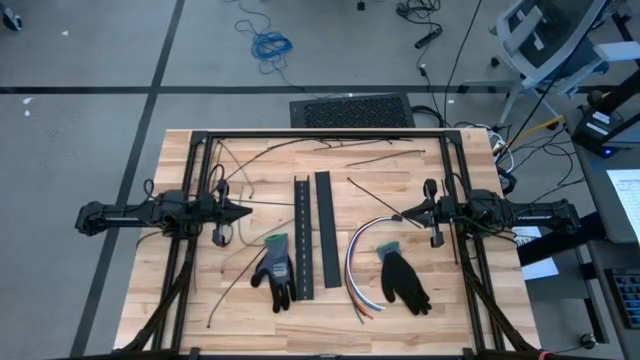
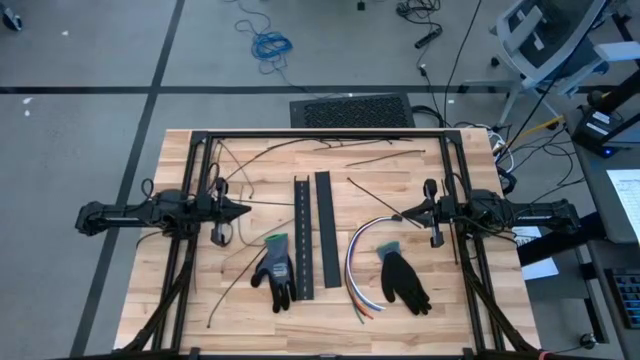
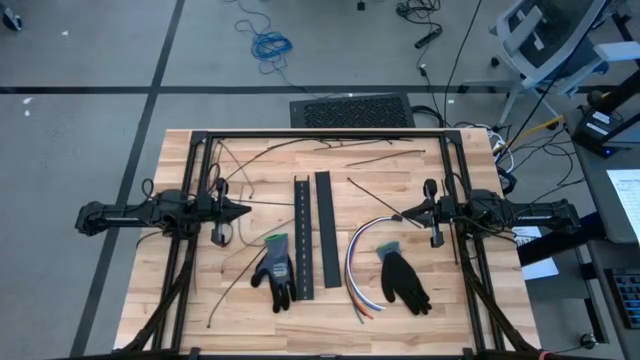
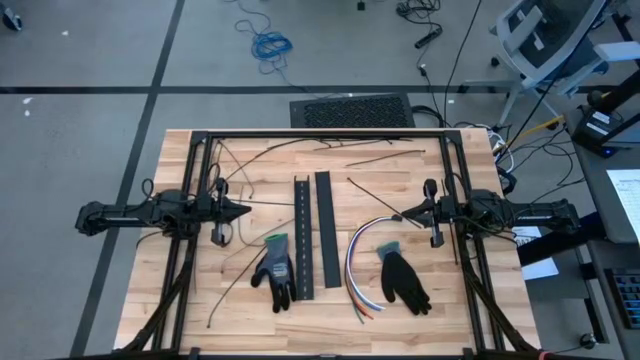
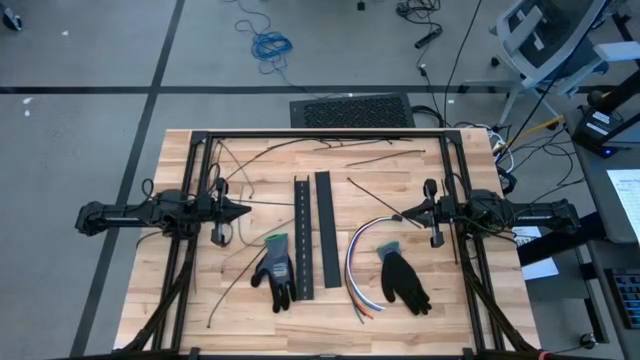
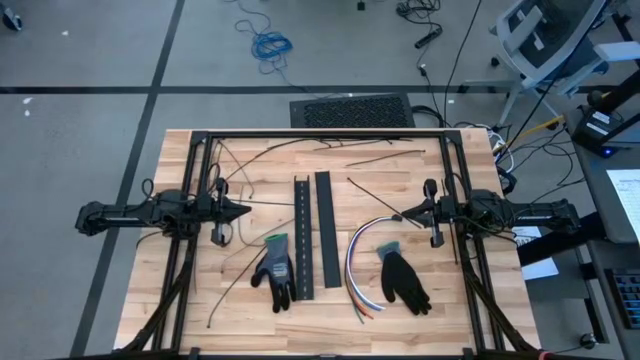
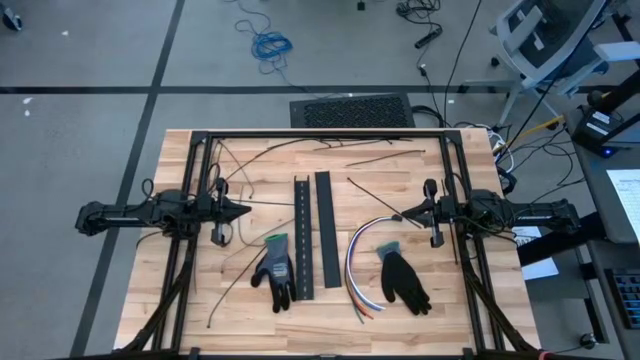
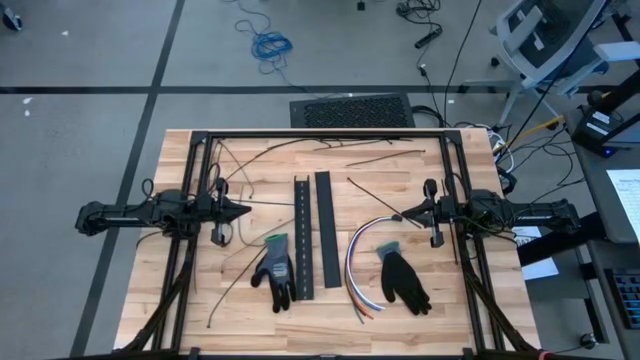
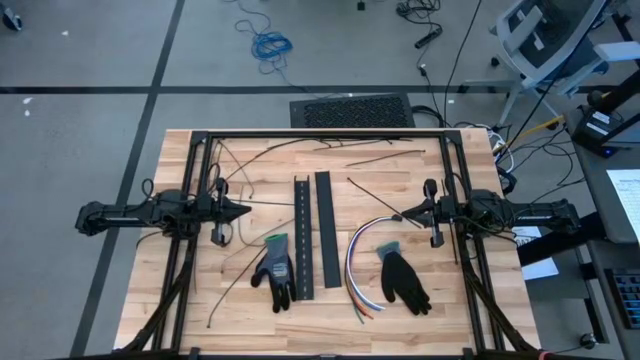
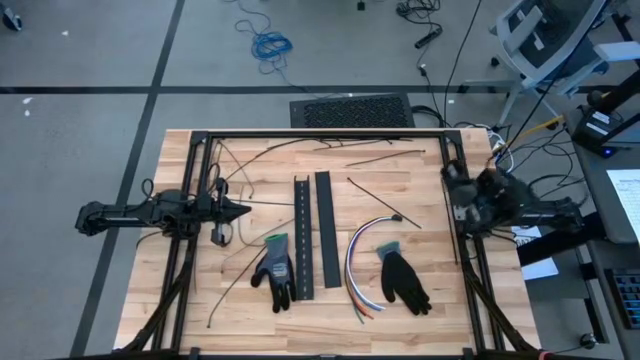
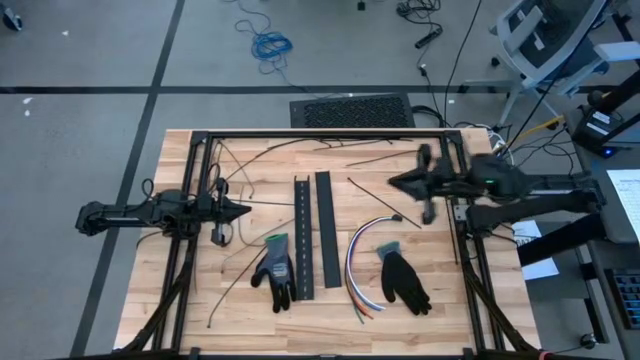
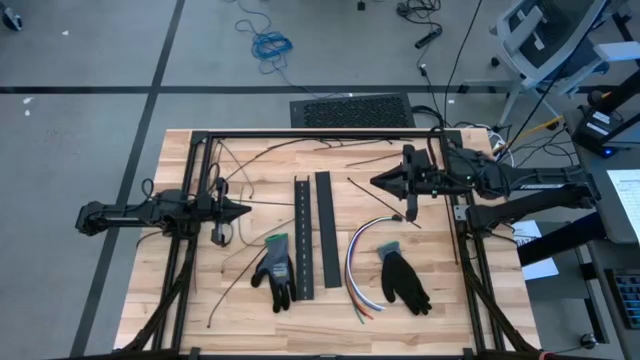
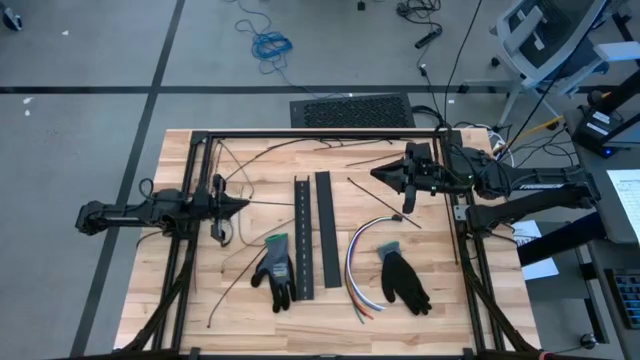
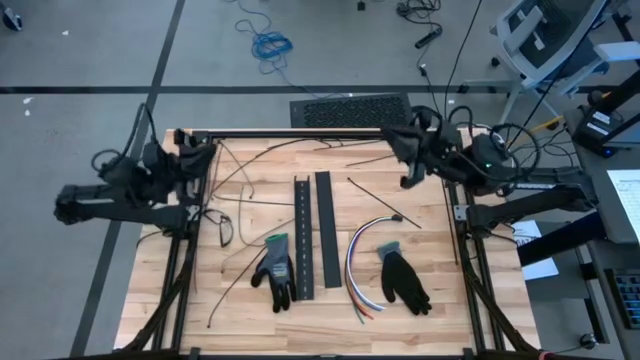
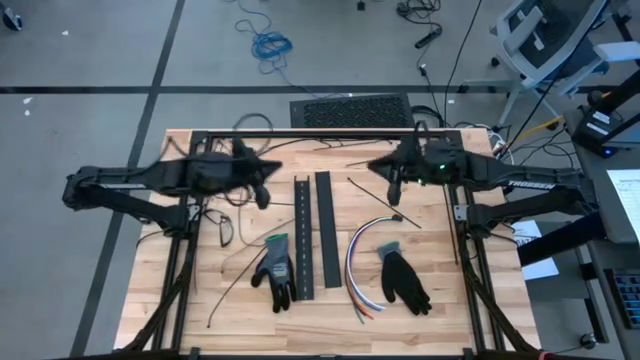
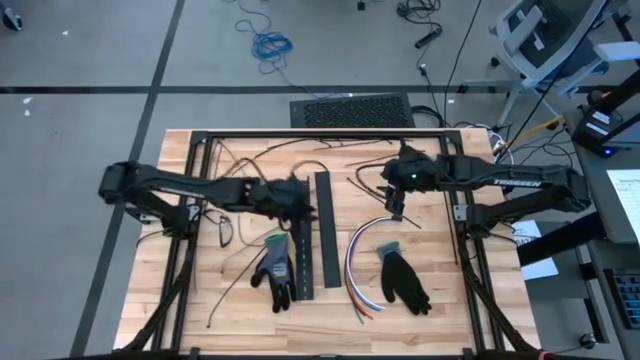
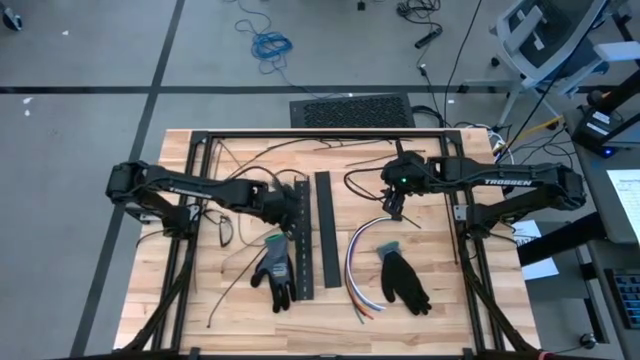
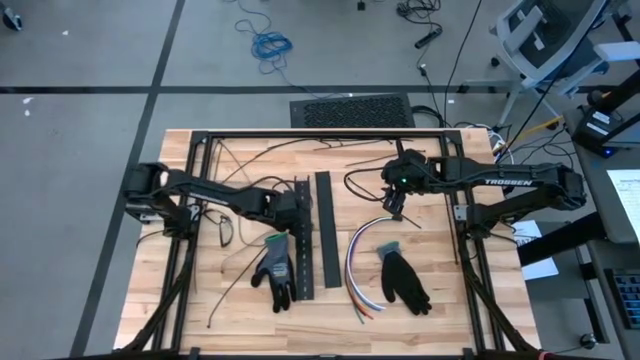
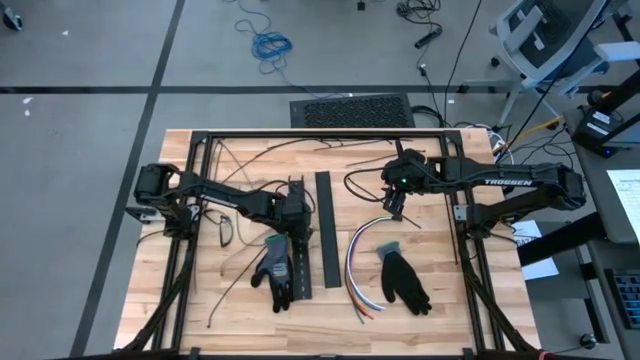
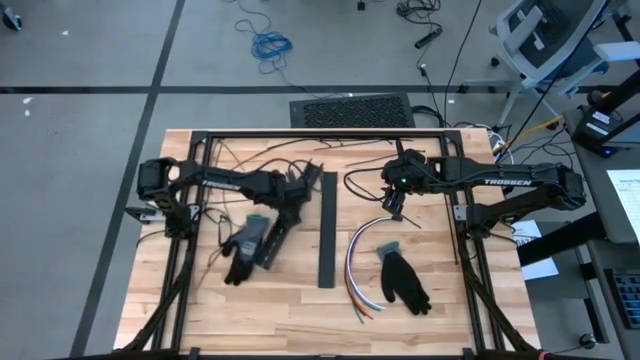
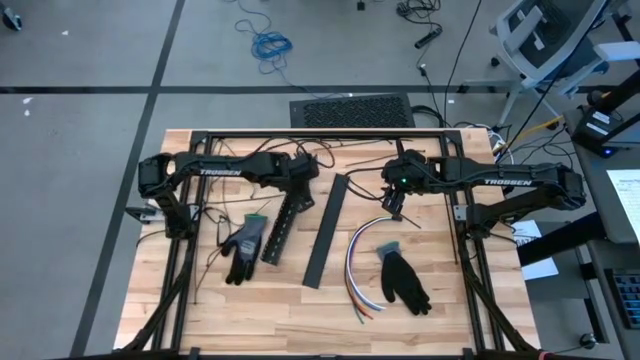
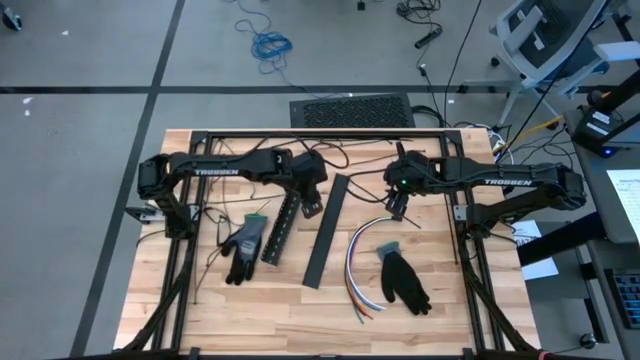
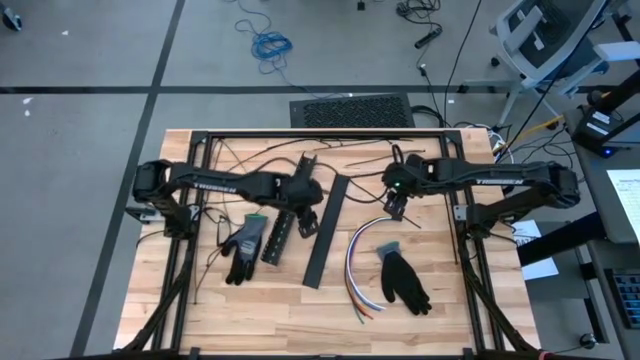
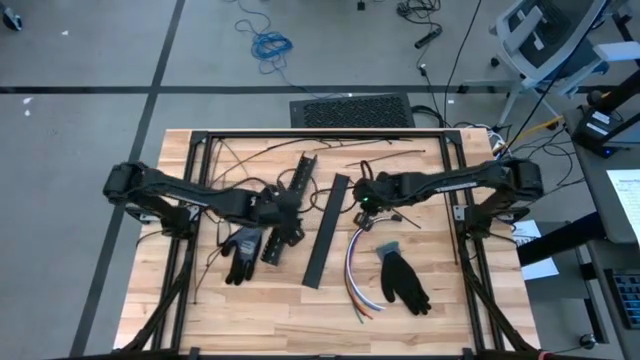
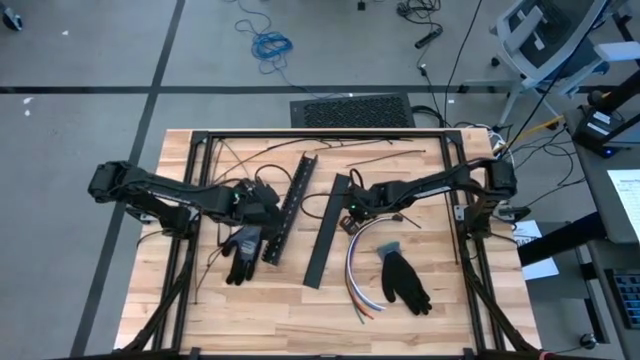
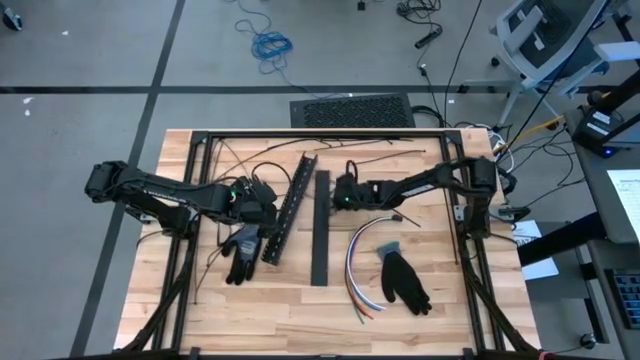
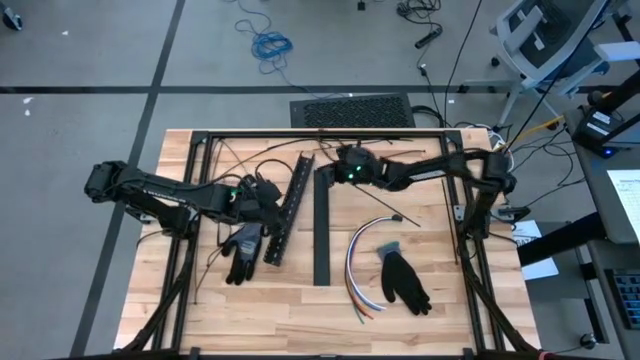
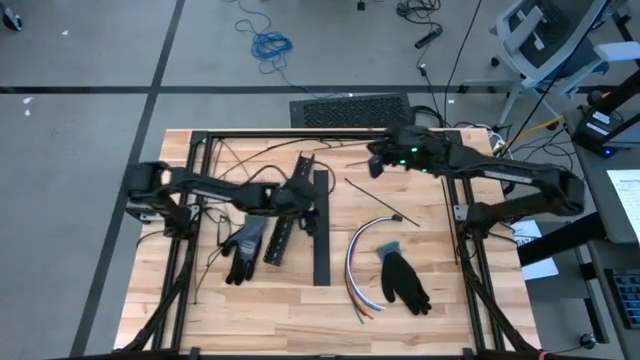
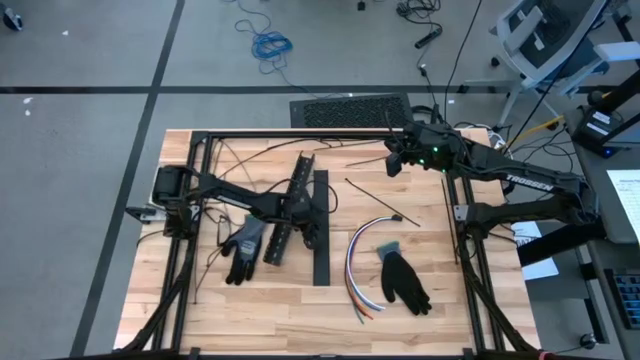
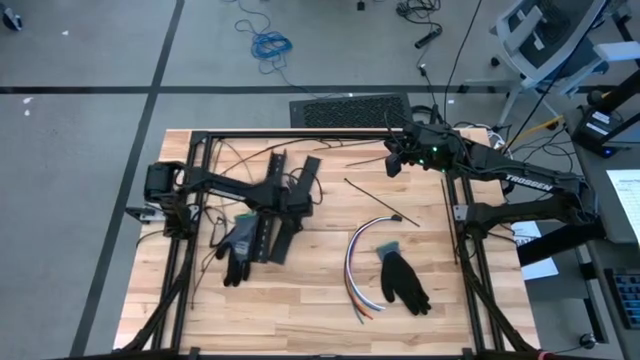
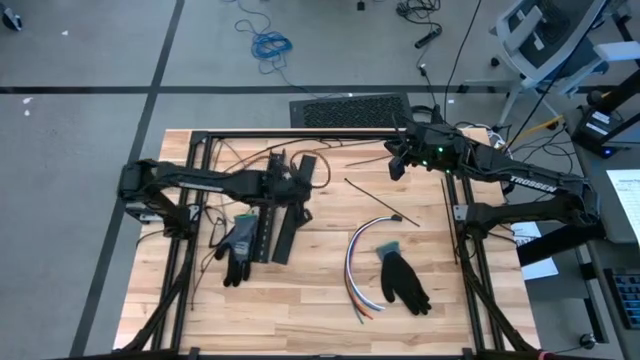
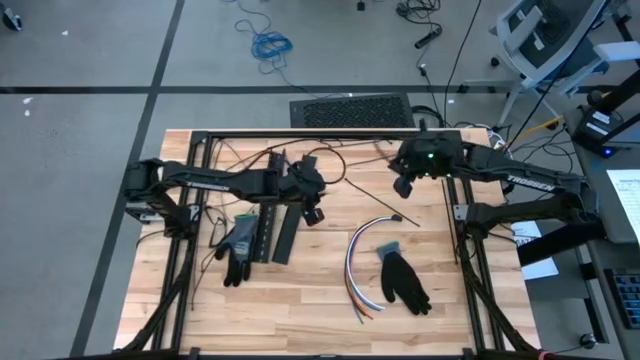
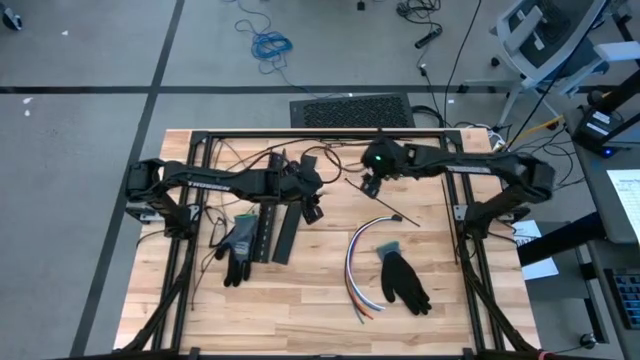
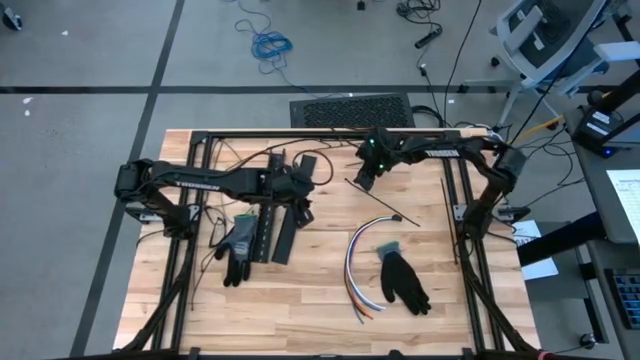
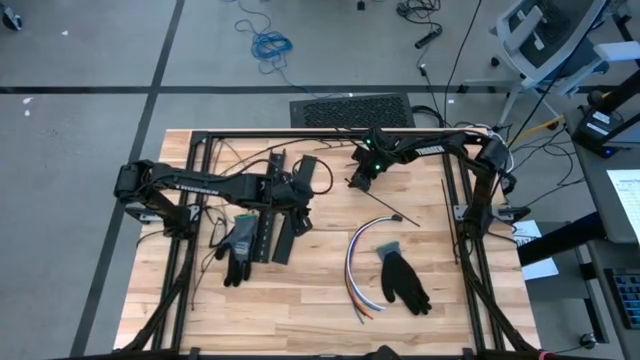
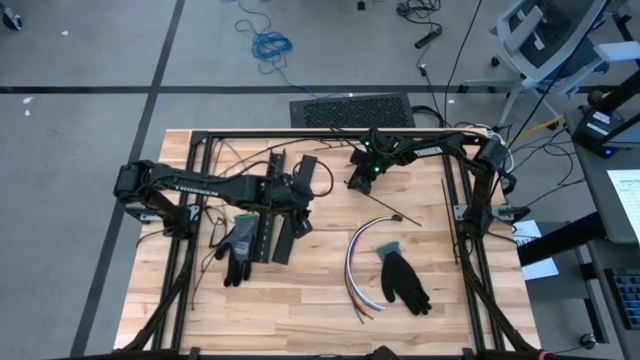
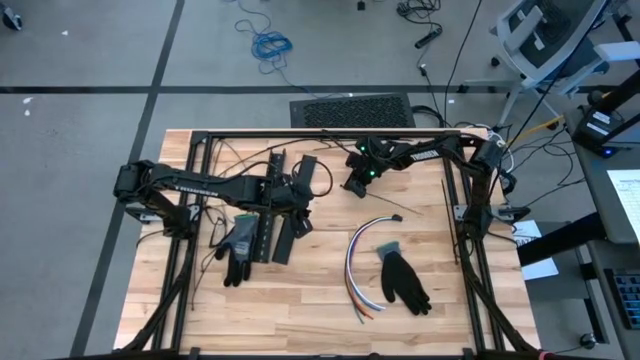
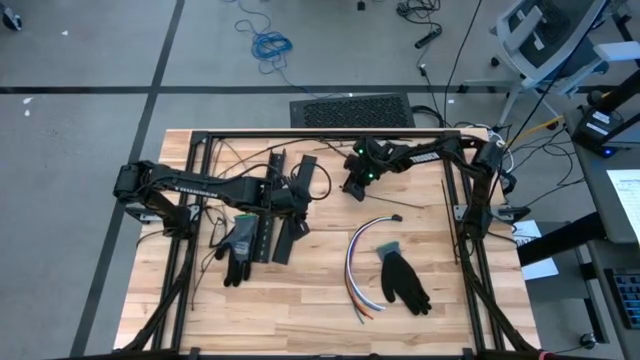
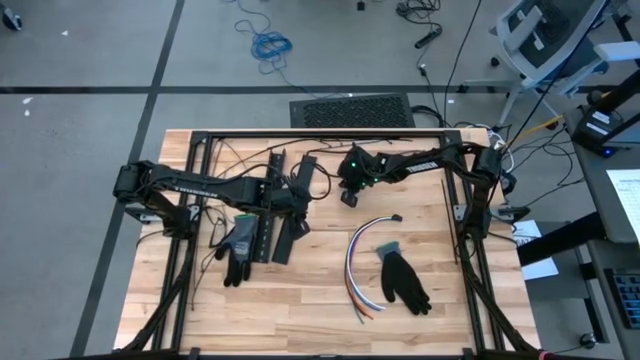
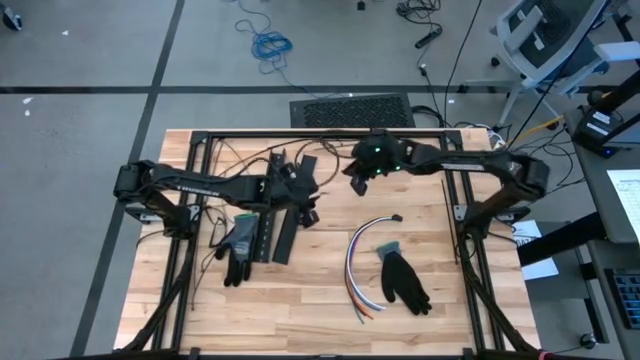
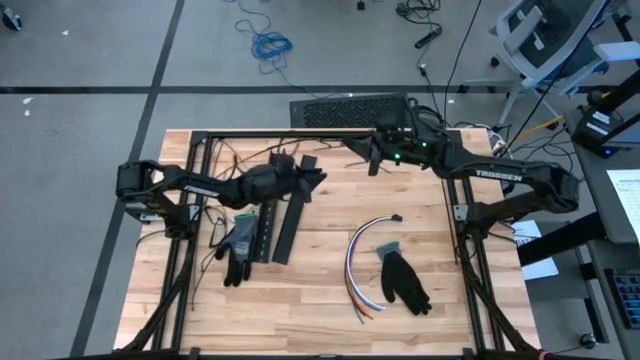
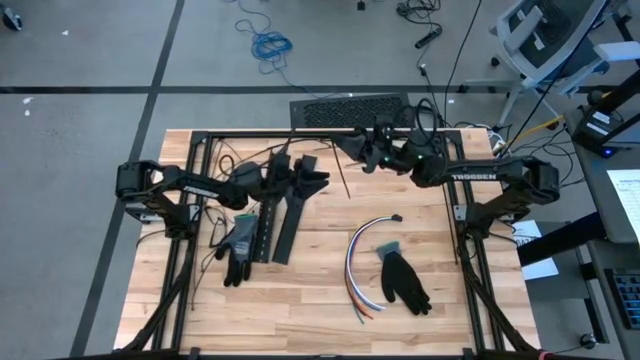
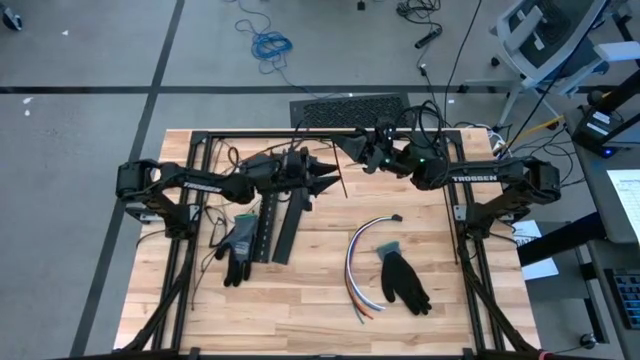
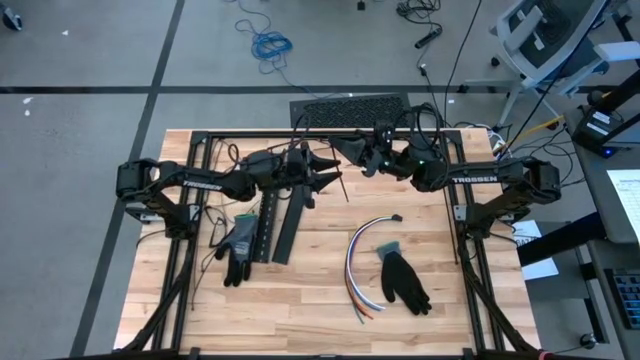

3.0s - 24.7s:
Task: Ziptie cables
Wrap the cable wires with the black ziptie
